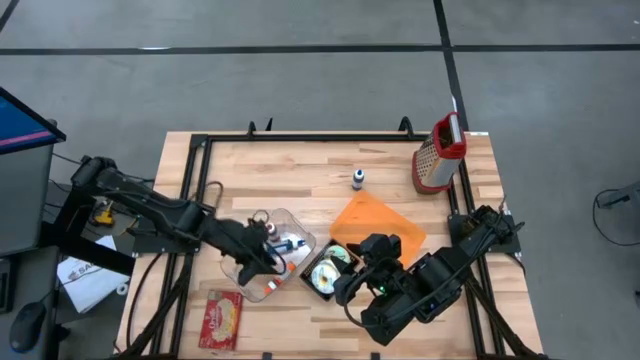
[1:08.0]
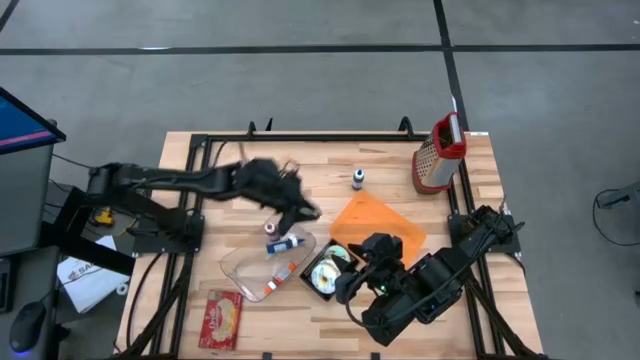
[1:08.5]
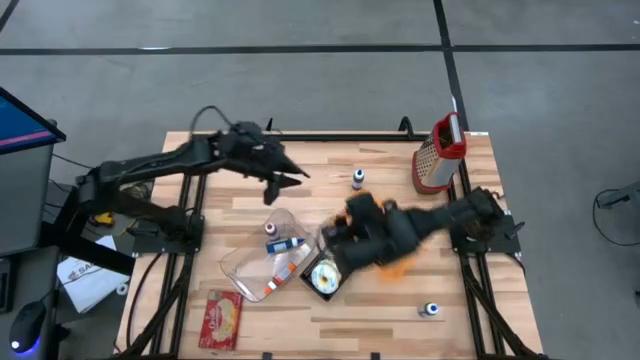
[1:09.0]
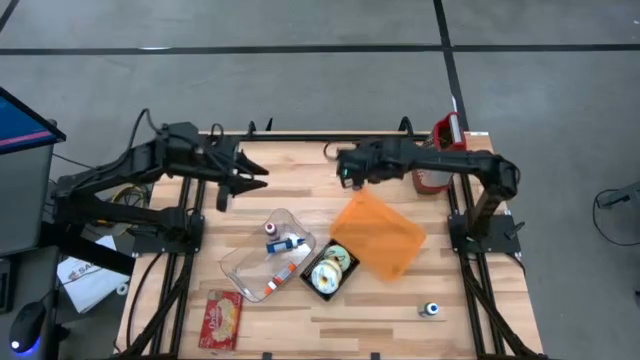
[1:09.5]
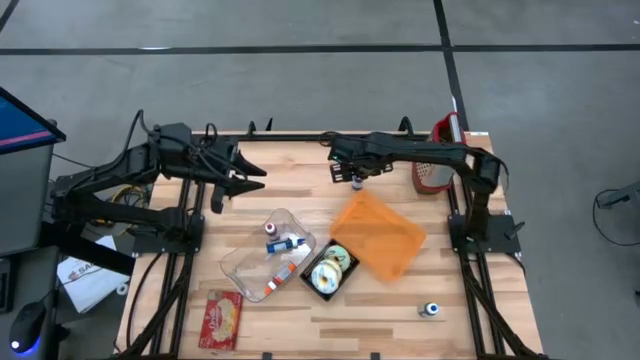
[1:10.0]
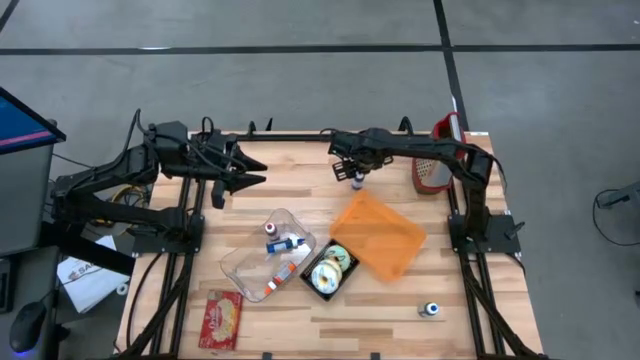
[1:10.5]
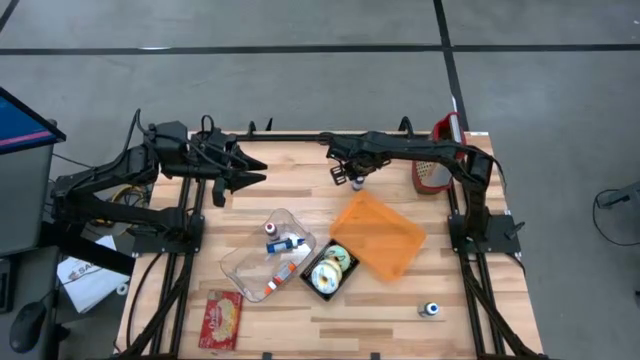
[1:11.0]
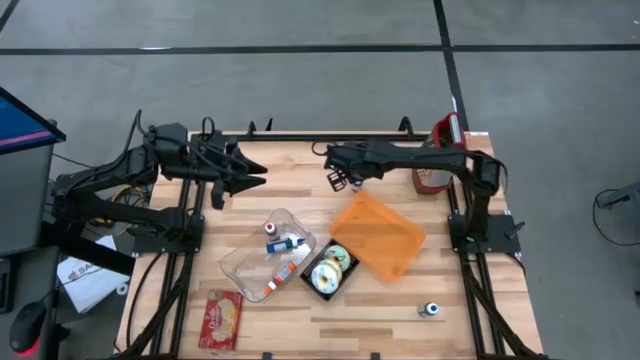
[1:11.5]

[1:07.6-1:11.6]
Put the top blue food coloring bottle into the transparent bin

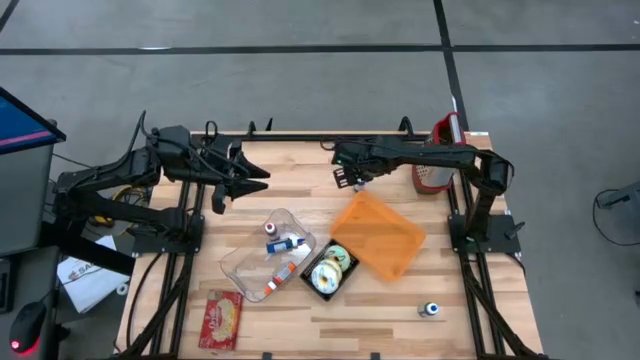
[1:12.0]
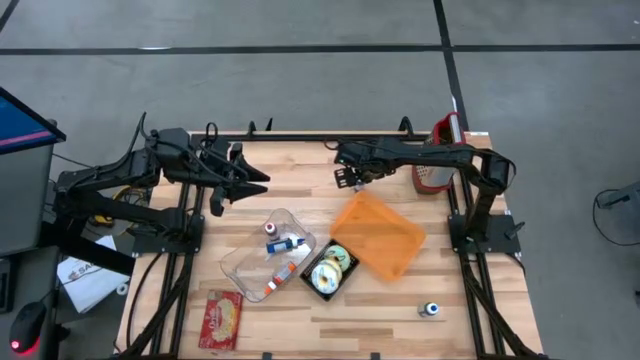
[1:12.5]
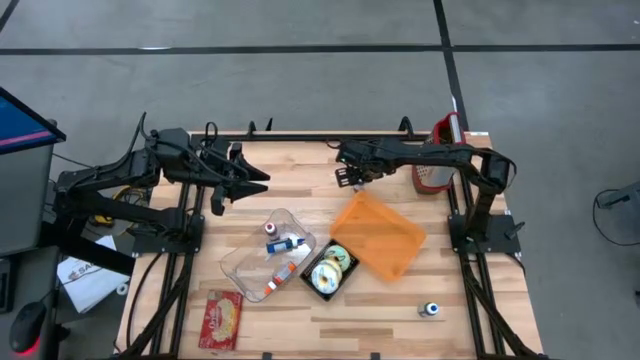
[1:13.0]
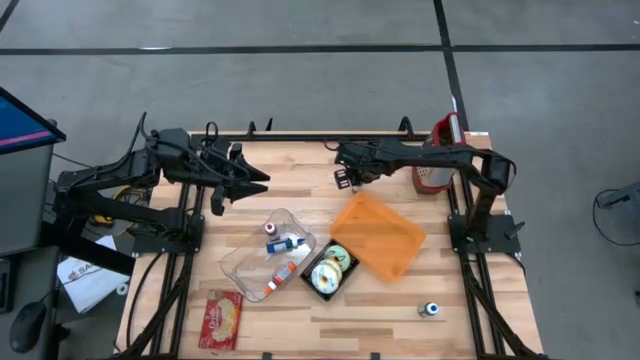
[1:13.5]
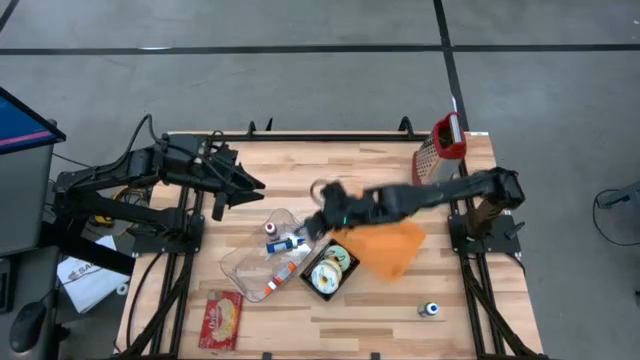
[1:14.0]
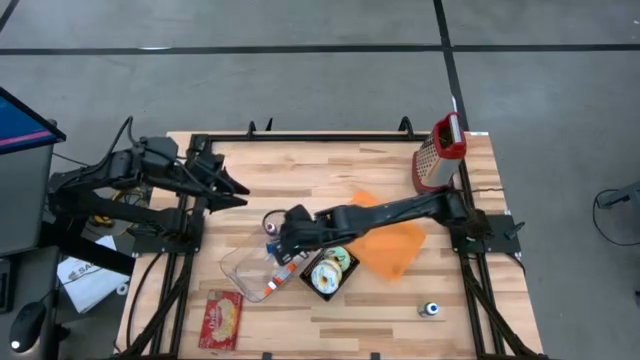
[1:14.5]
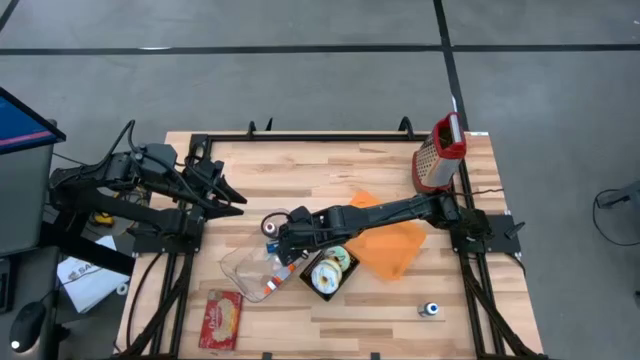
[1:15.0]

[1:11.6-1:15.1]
Put the top blue food coloring bottle into the transparent bin

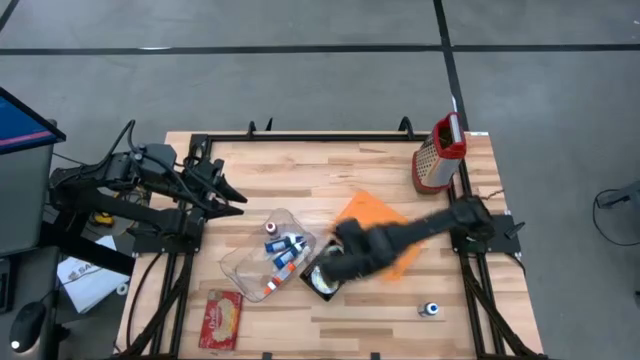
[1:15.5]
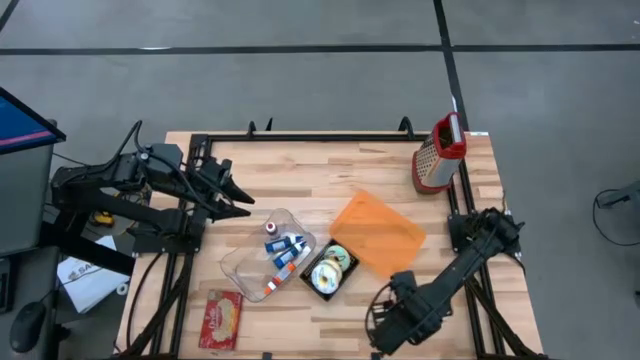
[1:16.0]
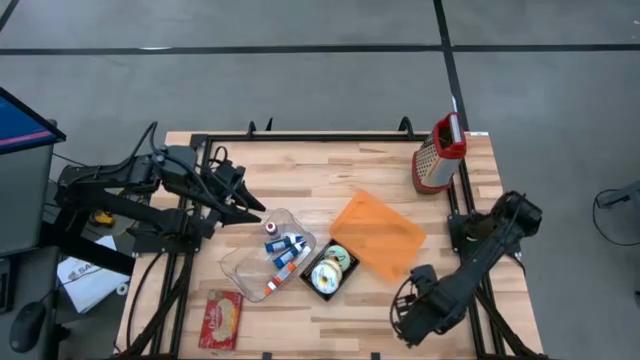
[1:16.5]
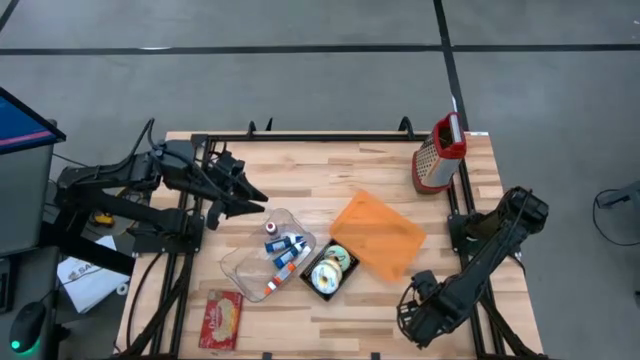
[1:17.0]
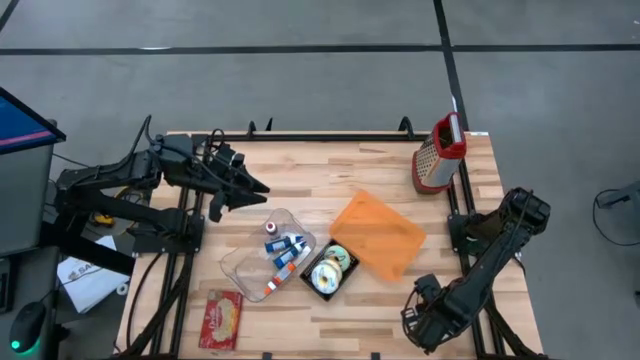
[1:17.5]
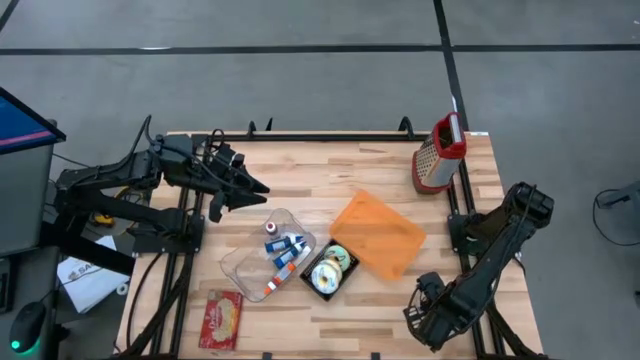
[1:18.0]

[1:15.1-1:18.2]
Put the blue food coloring bottle into the transparent bin

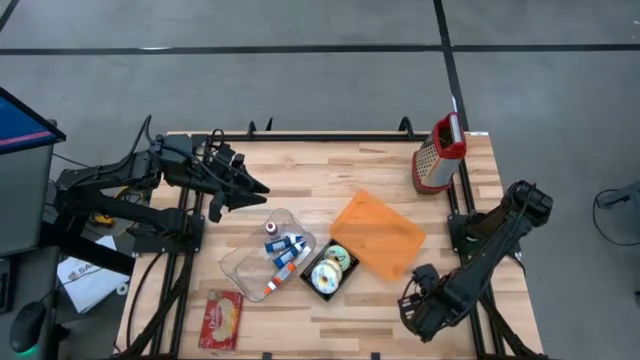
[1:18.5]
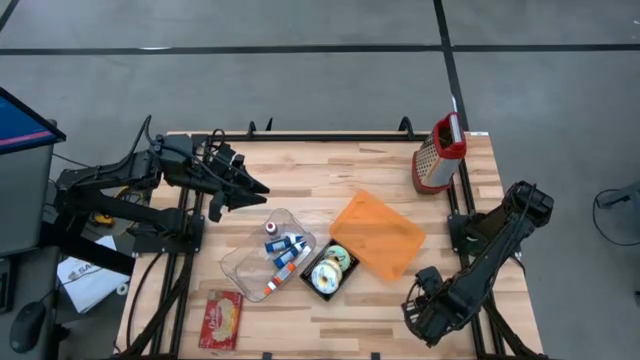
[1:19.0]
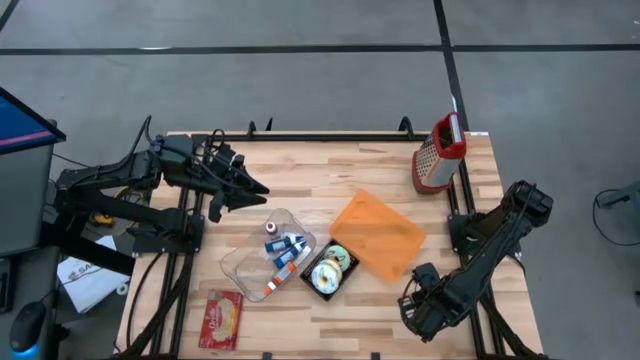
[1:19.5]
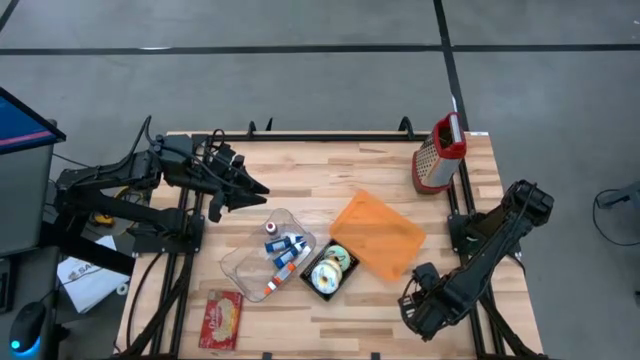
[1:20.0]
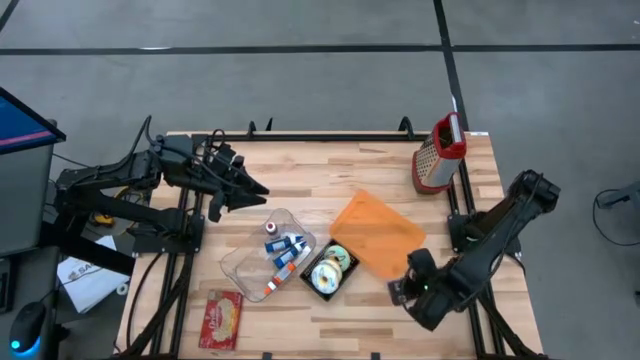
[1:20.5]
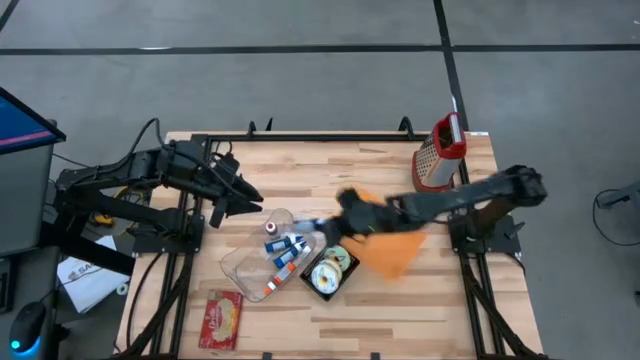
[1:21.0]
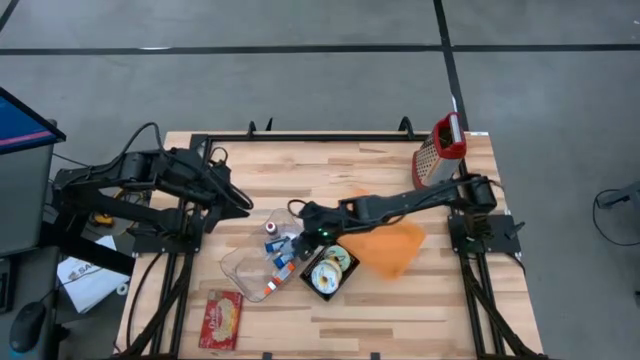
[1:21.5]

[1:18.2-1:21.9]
Put the blue food coloring bottle into the transparent bin

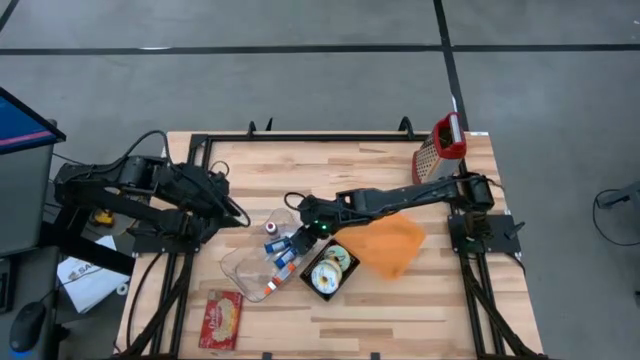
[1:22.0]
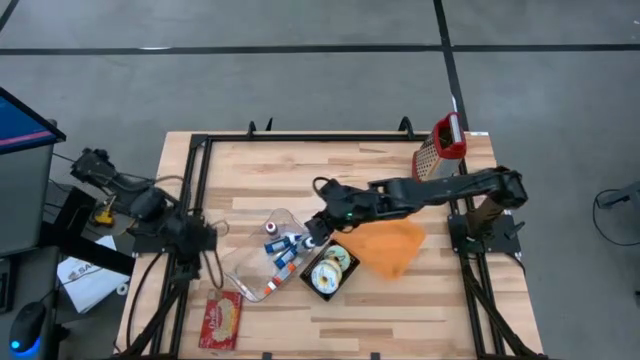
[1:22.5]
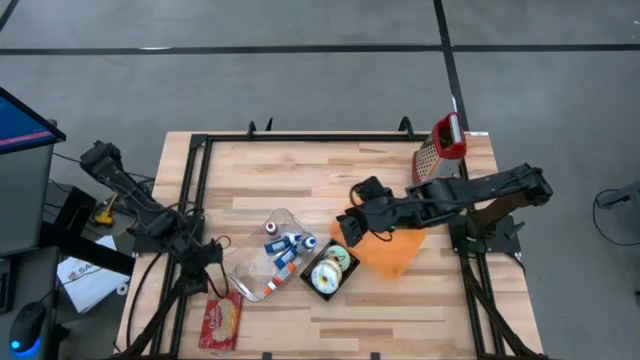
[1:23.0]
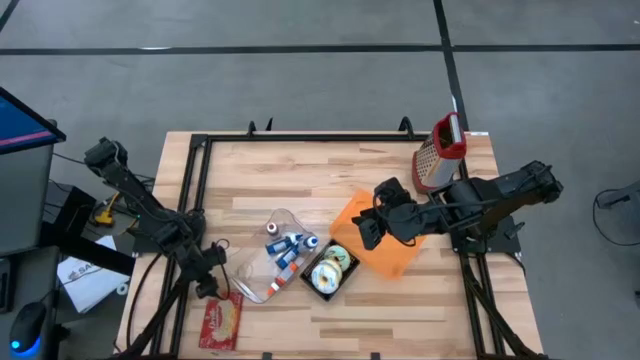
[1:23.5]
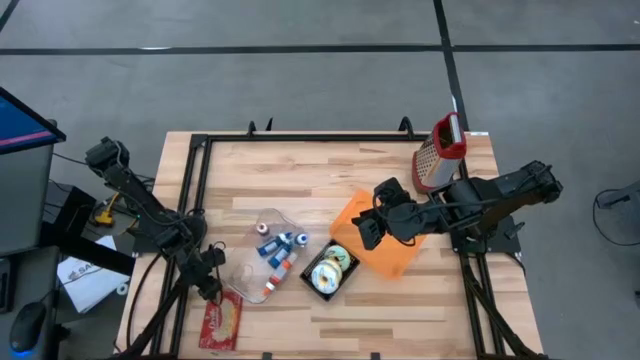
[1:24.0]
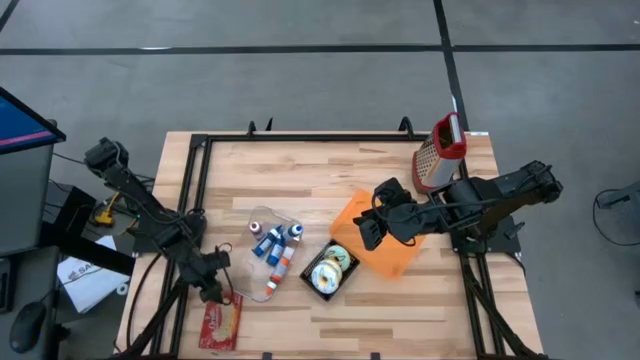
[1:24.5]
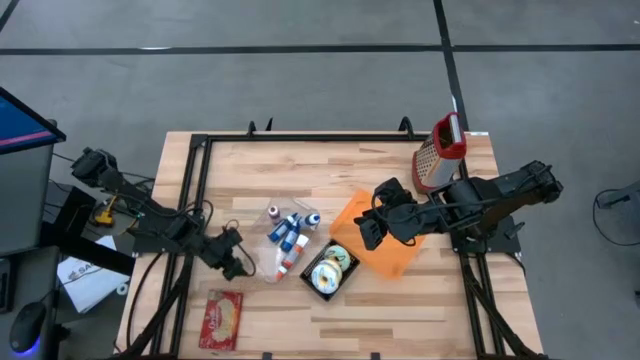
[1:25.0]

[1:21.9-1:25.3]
Adjust the transparent bin

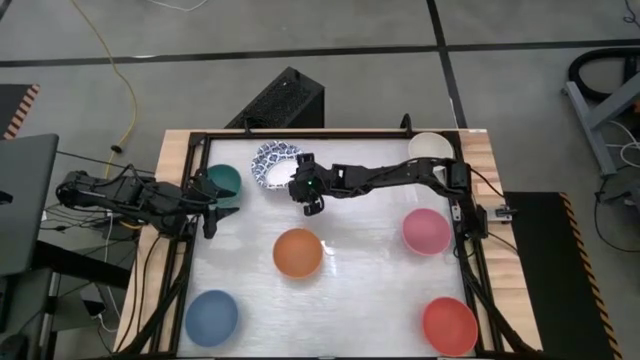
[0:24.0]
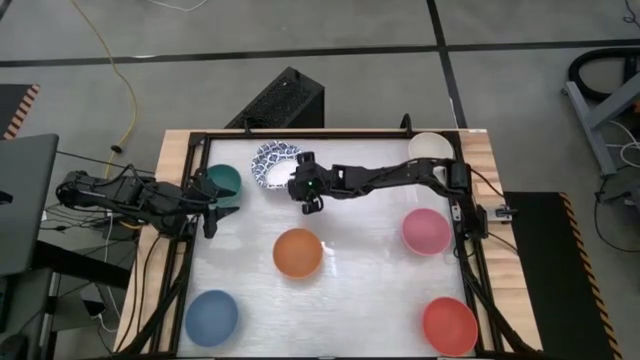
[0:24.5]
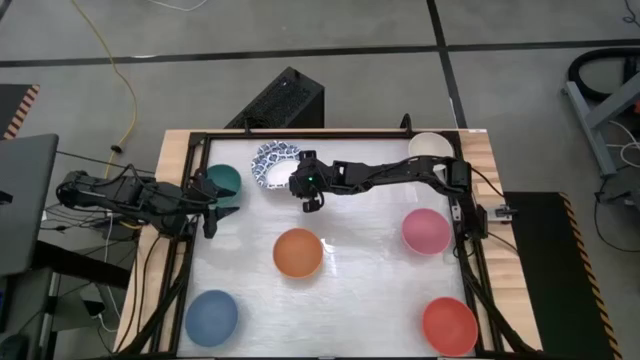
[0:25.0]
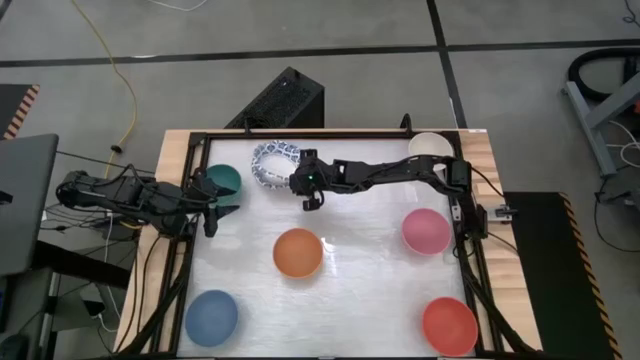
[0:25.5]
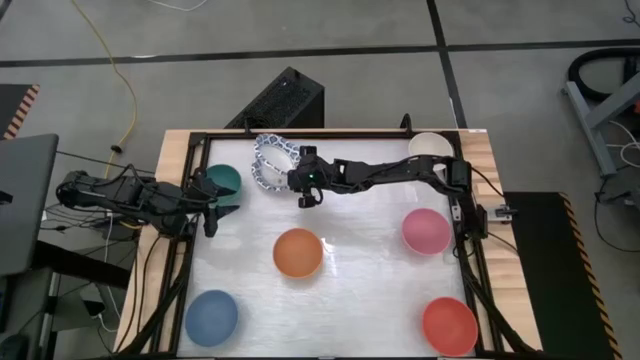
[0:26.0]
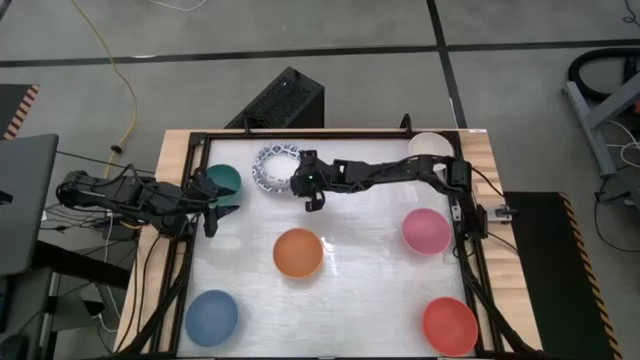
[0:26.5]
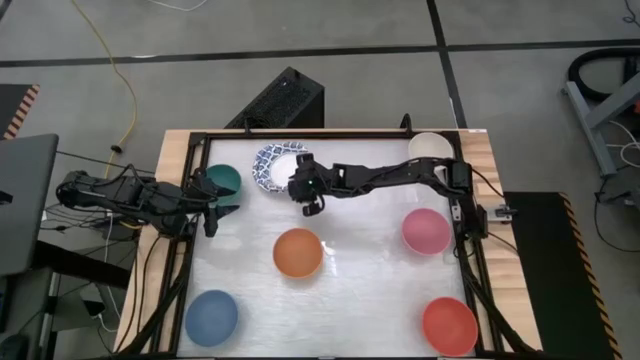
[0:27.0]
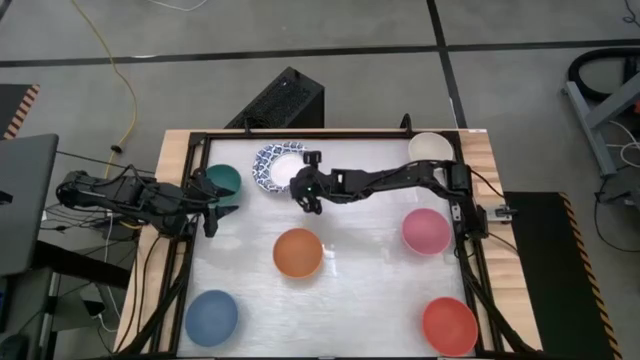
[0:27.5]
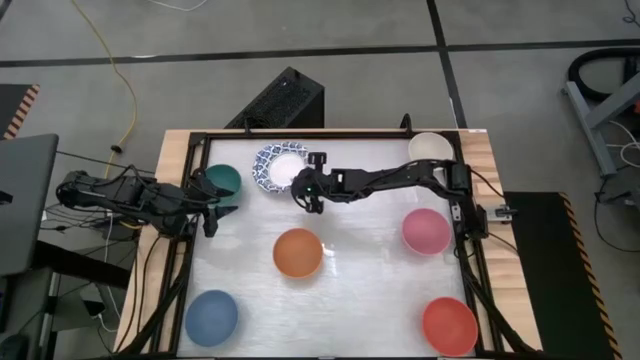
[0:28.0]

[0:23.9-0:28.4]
Stack the right blue patterned bowl on the left blue patterned bowl
